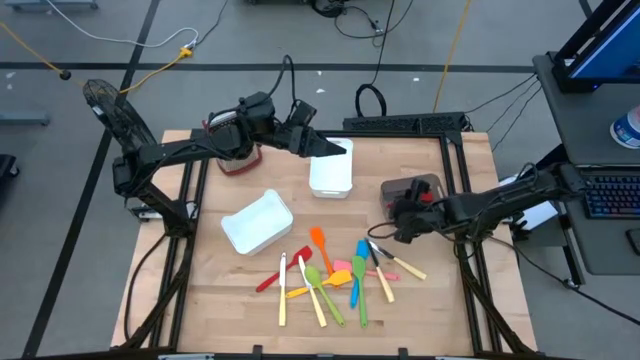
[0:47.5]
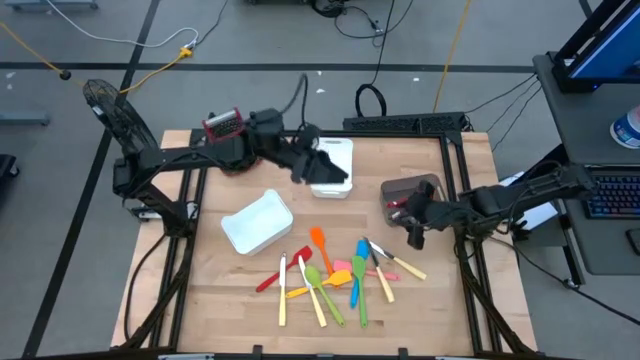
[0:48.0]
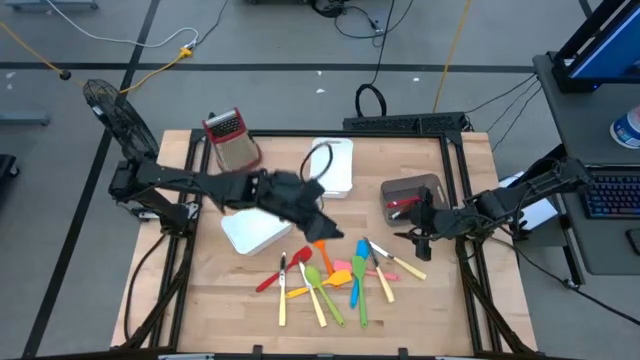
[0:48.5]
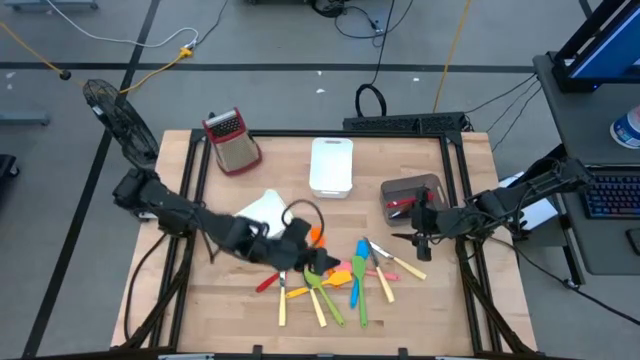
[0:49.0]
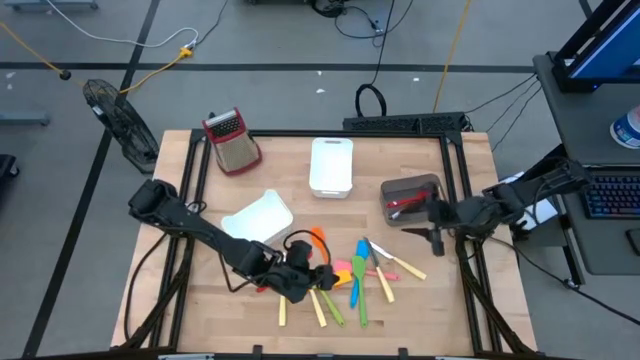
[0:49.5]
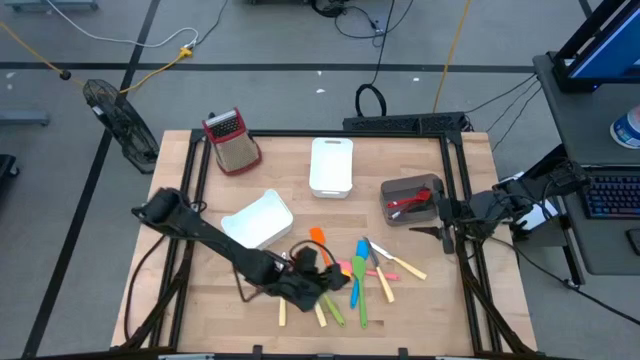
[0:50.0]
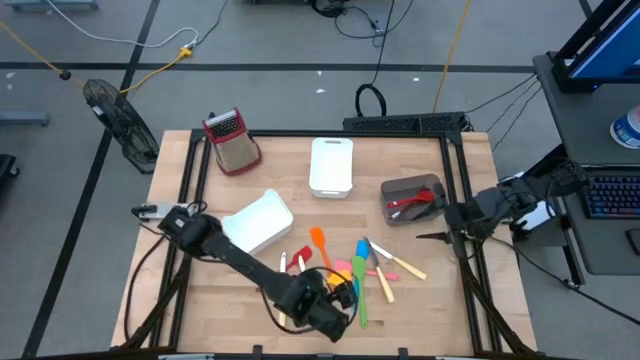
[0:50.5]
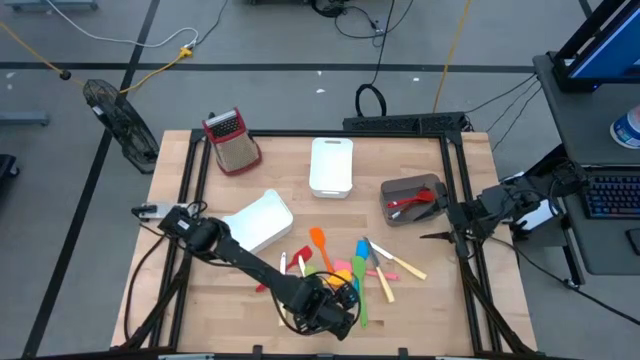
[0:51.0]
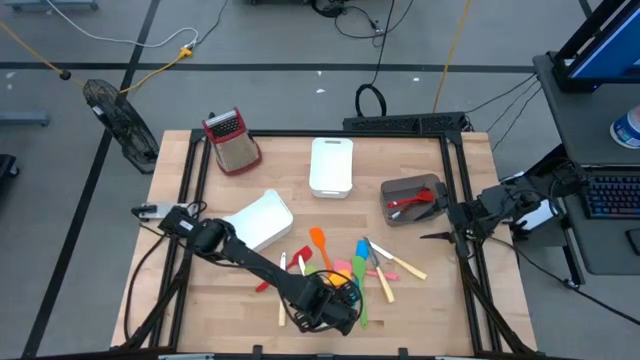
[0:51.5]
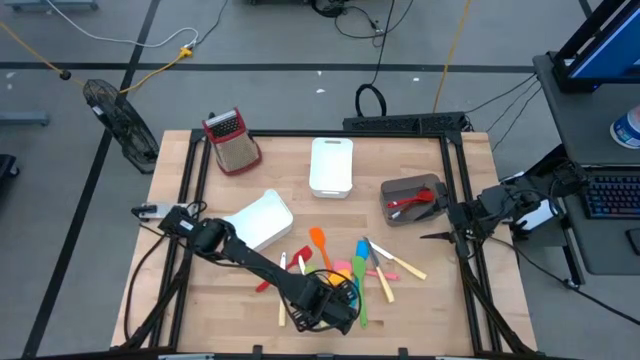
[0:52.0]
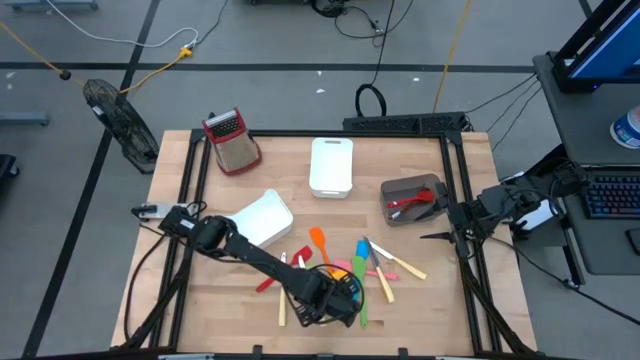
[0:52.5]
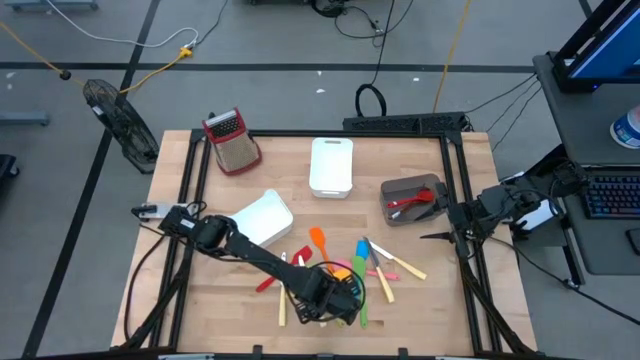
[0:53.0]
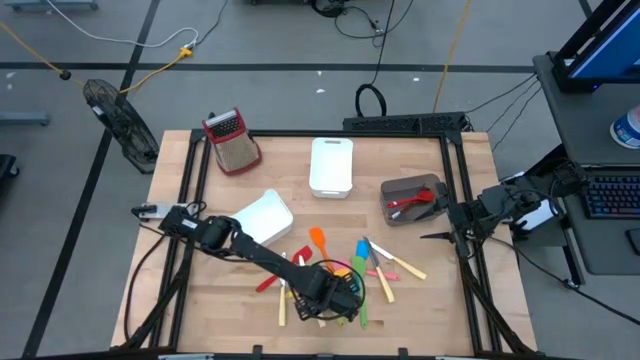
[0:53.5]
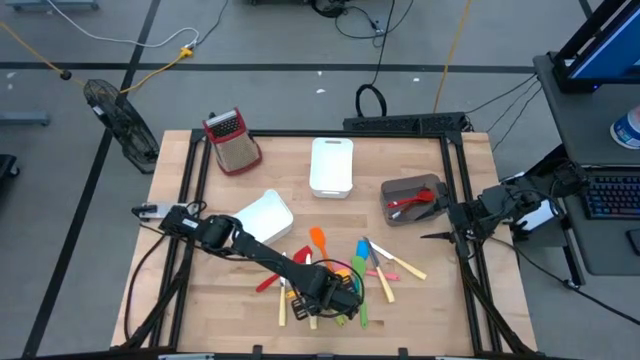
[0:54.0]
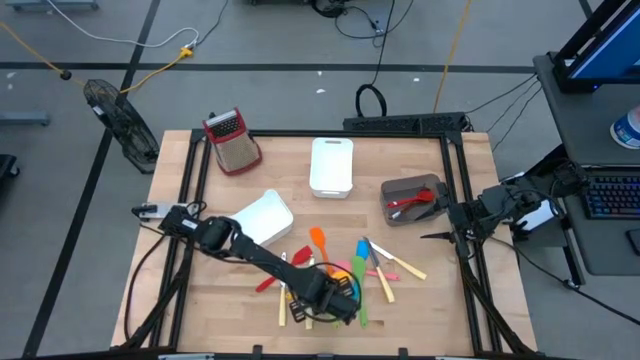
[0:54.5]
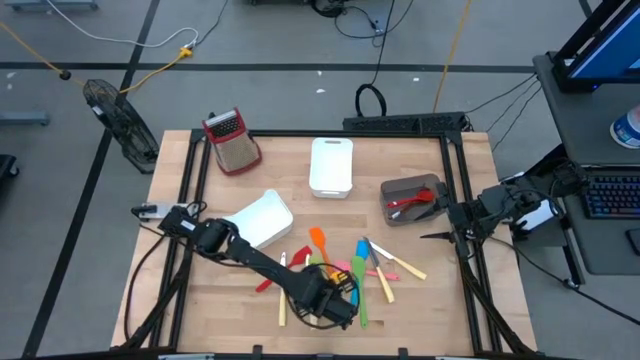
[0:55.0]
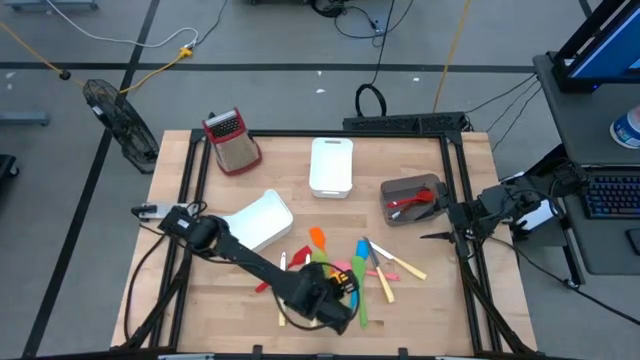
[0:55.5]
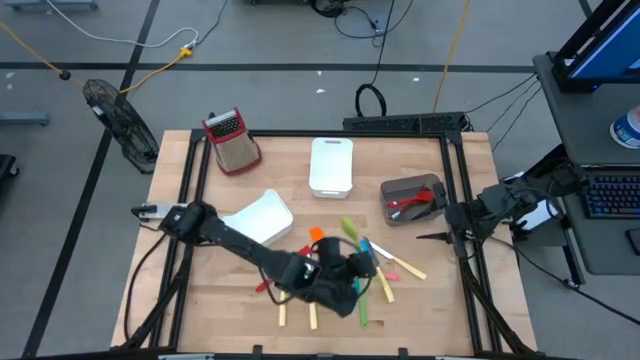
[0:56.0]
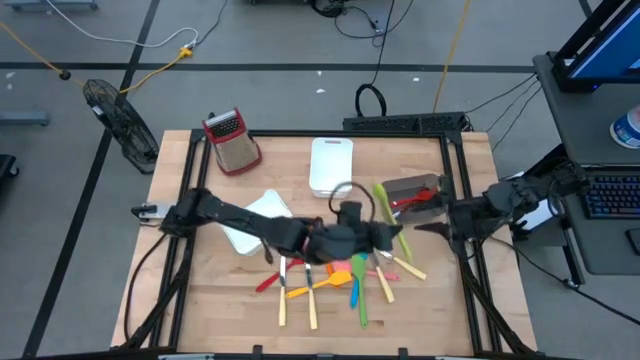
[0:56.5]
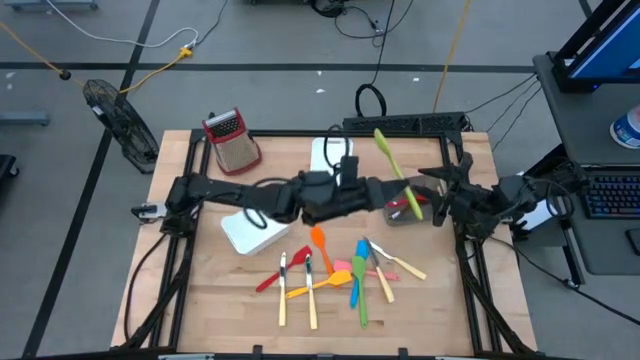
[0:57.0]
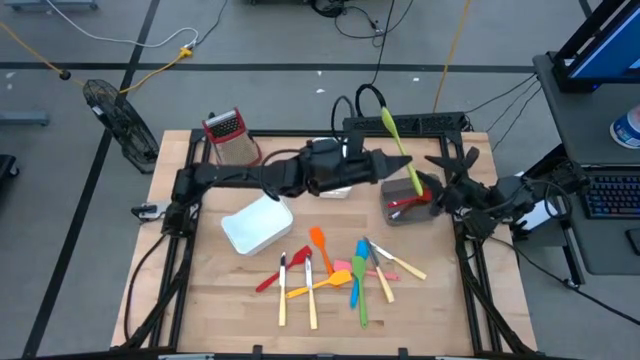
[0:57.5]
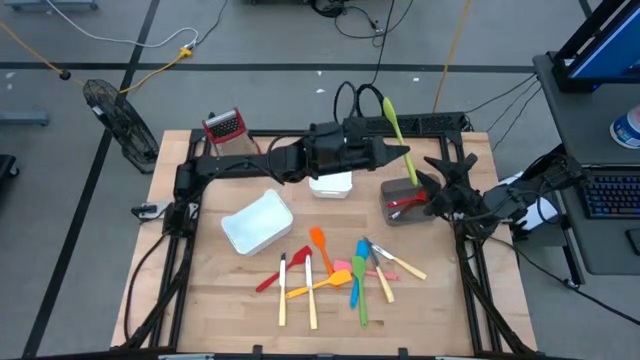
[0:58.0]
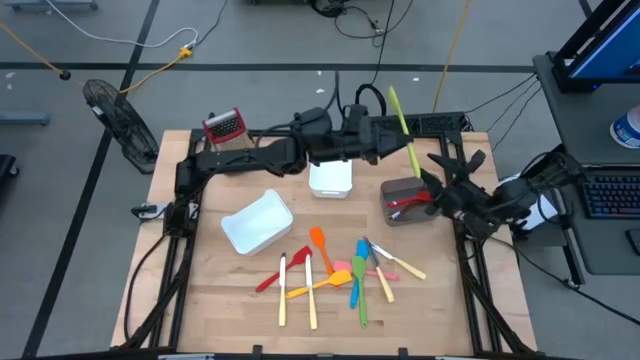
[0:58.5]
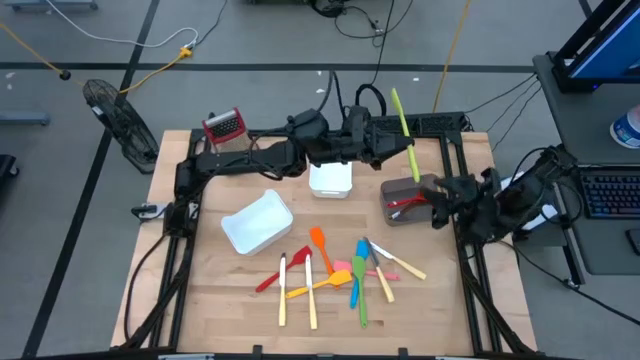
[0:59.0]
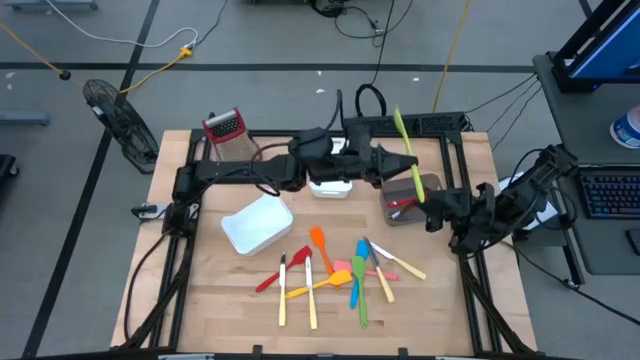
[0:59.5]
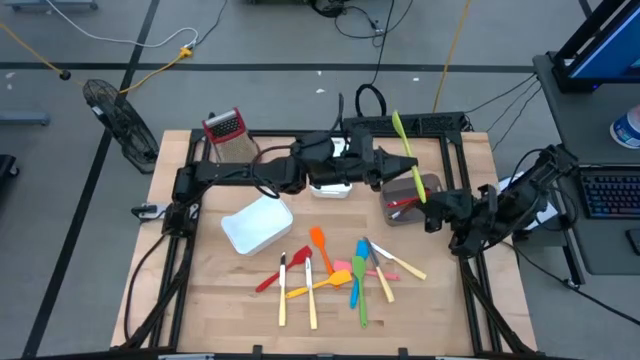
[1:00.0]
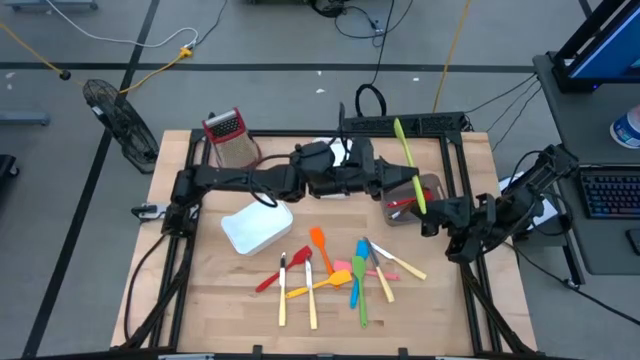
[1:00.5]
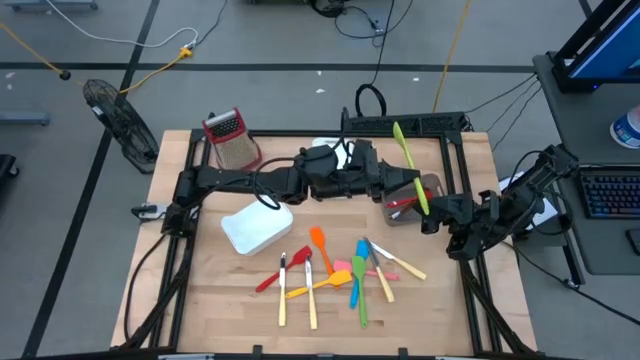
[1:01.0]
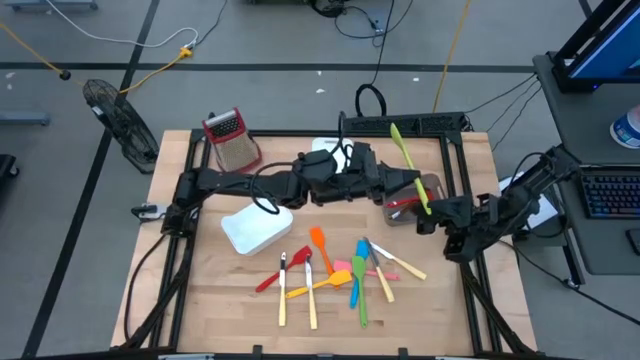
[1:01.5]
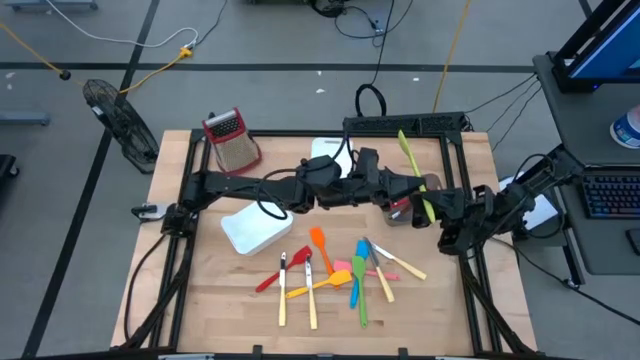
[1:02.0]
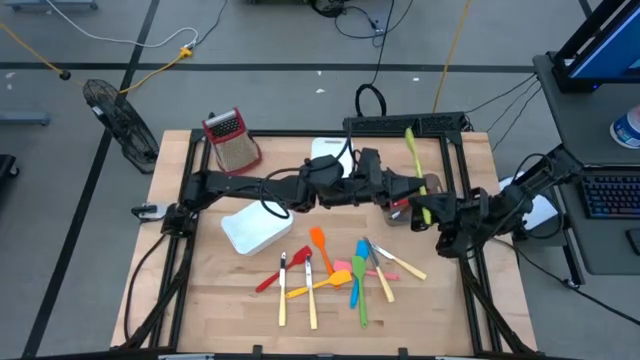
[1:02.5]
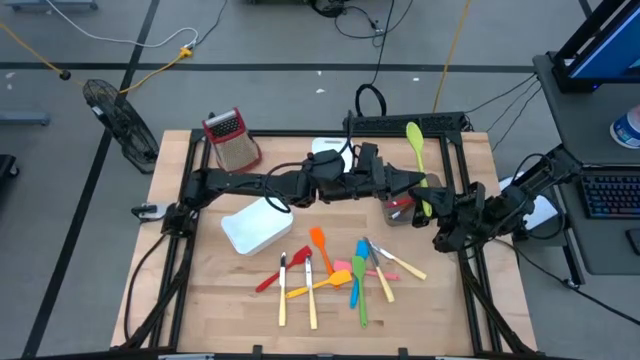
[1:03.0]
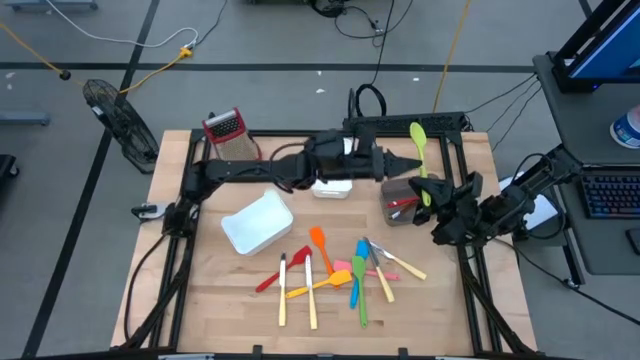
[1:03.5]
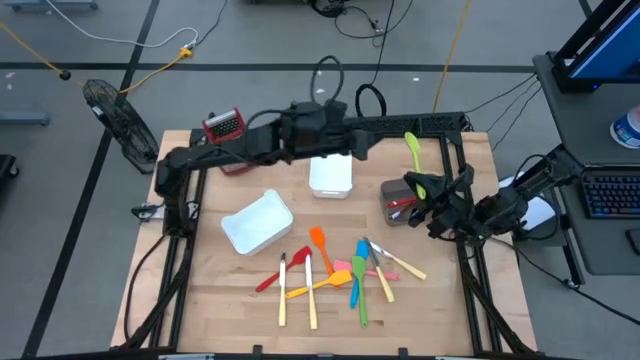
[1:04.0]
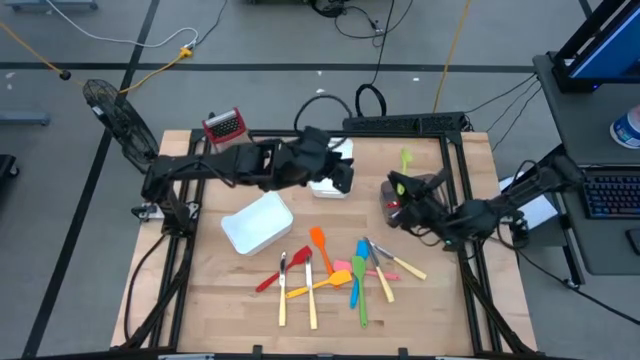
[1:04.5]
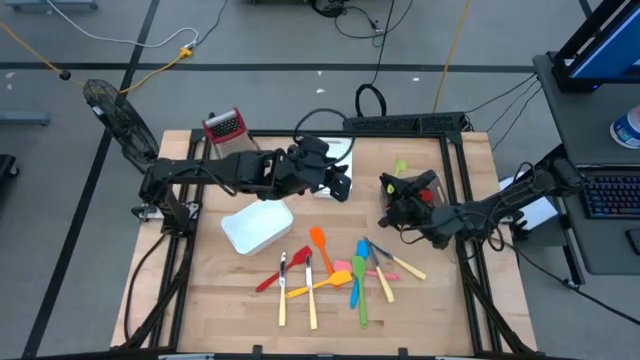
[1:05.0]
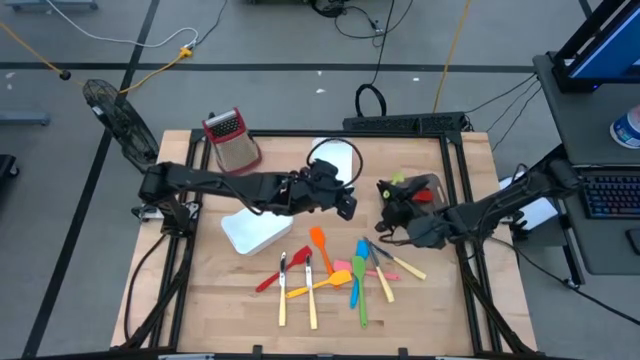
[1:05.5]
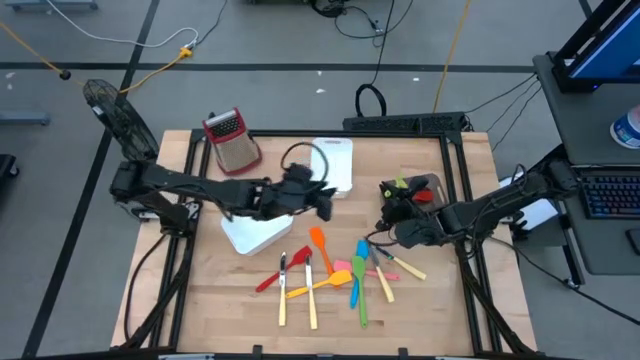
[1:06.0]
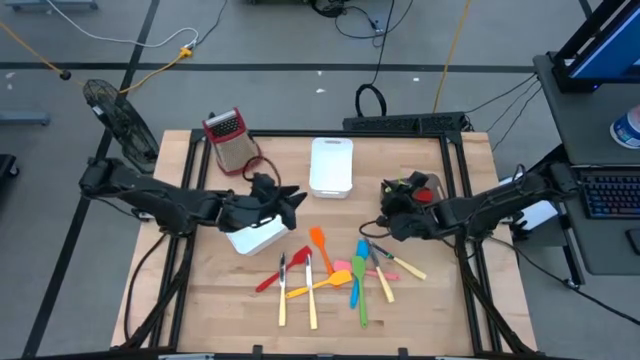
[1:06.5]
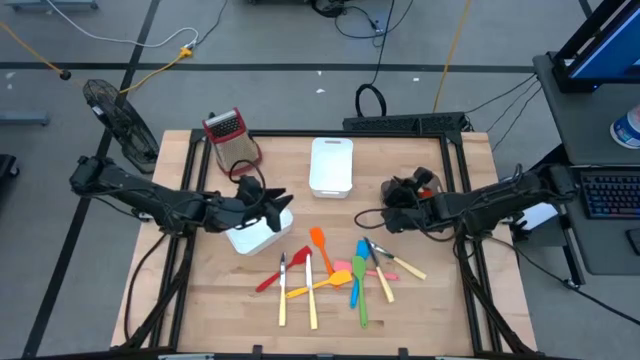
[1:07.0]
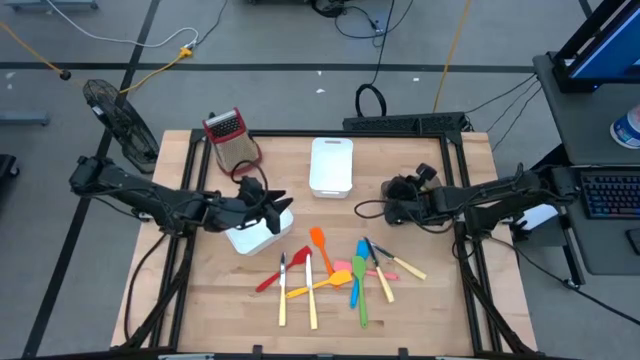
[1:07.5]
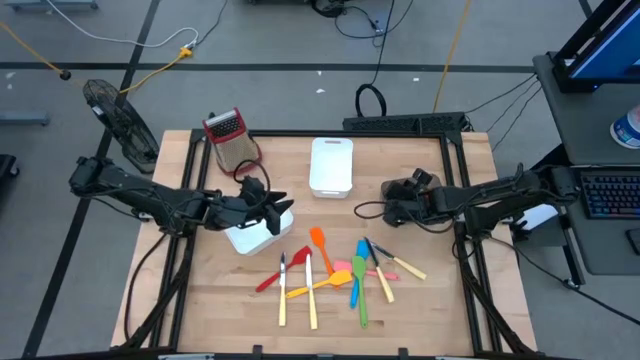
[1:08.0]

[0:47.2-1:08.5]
Task: Pick & Place Kitchen Items
Put the green serving spoon into the black bin
